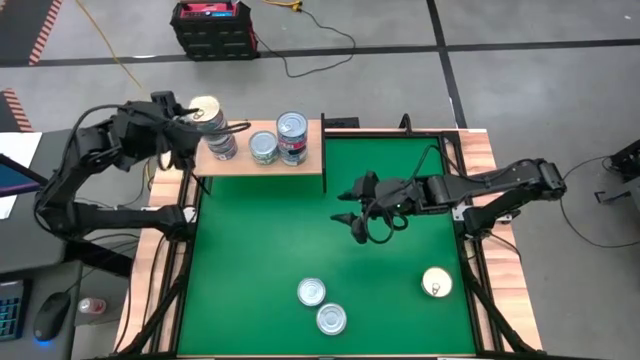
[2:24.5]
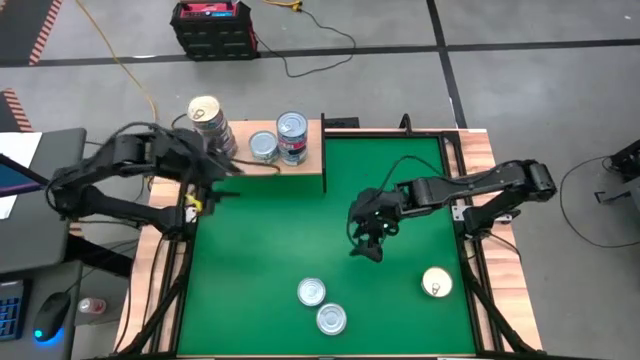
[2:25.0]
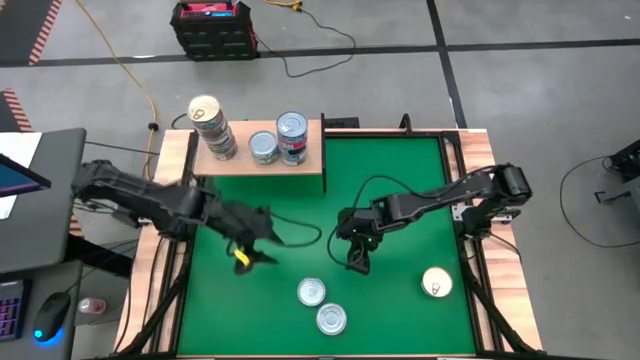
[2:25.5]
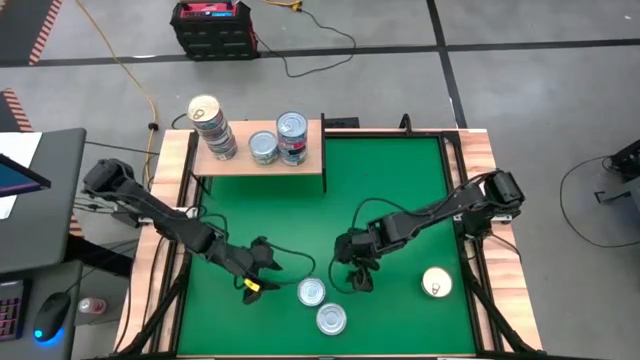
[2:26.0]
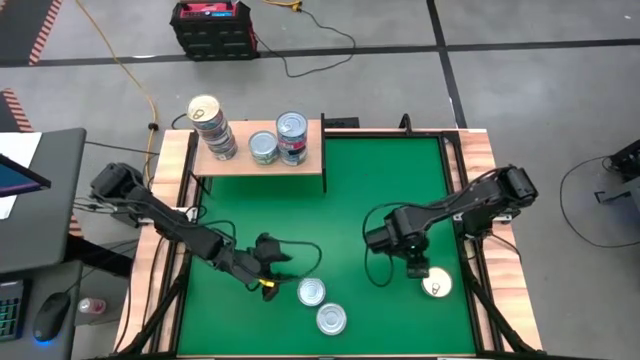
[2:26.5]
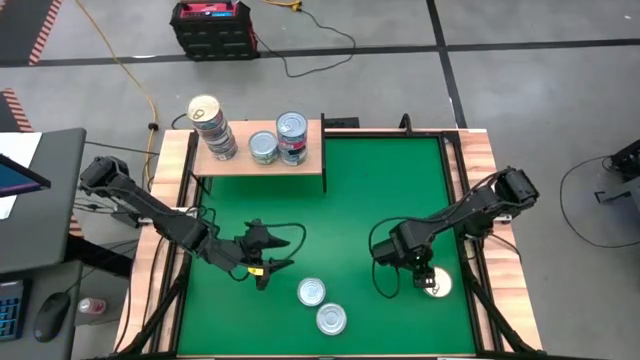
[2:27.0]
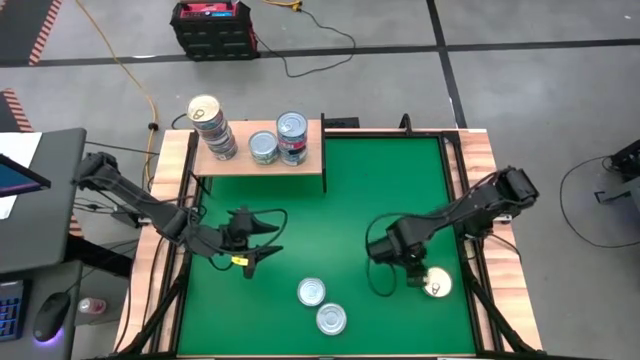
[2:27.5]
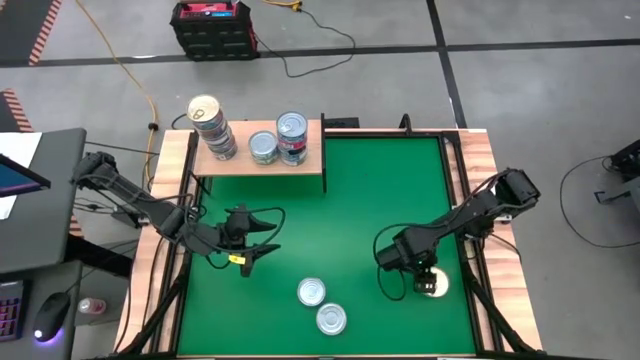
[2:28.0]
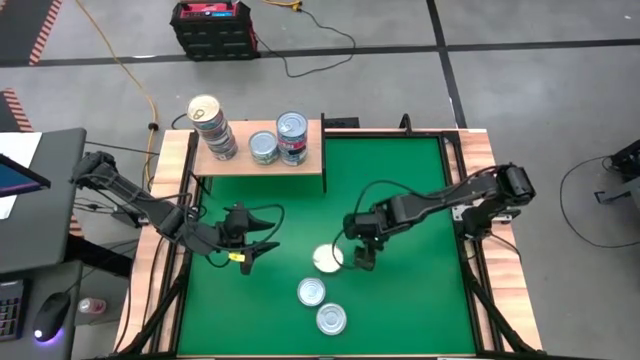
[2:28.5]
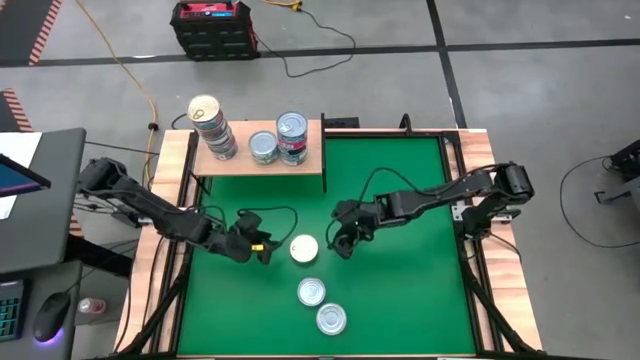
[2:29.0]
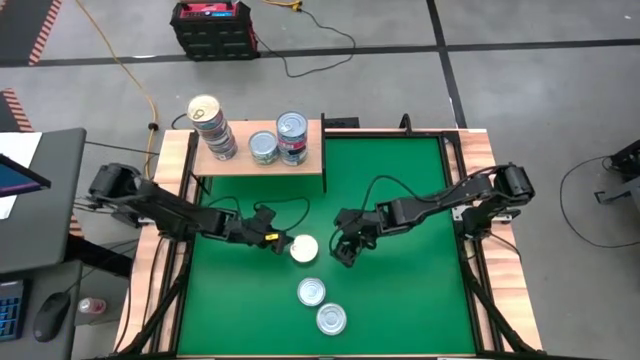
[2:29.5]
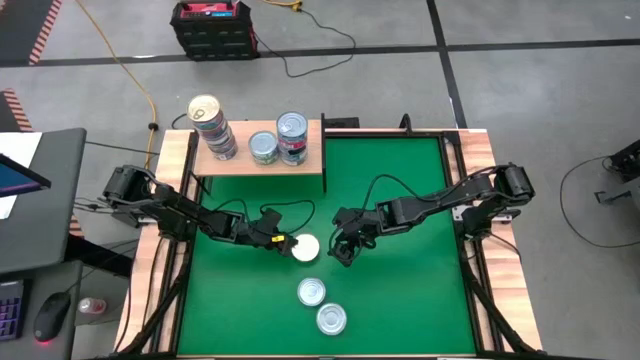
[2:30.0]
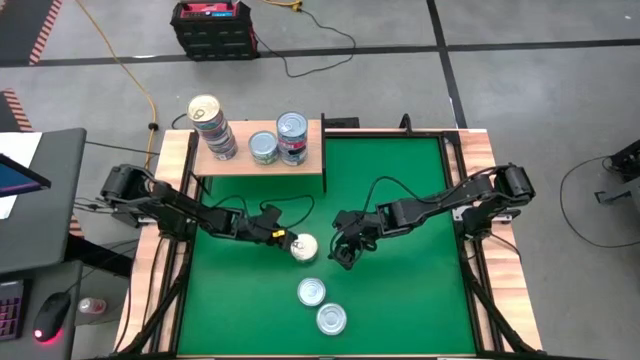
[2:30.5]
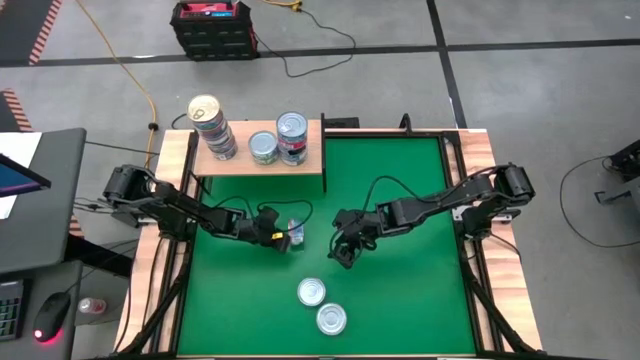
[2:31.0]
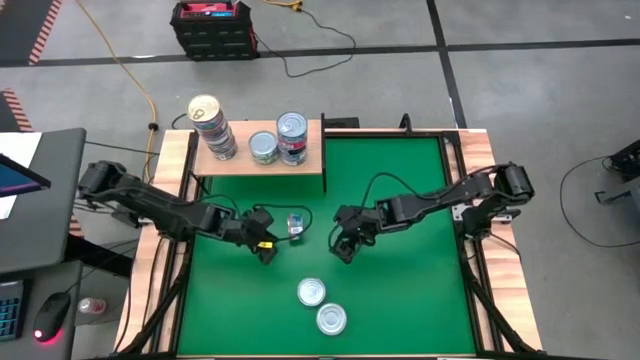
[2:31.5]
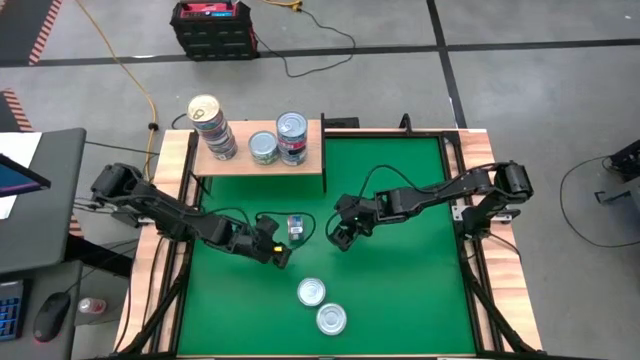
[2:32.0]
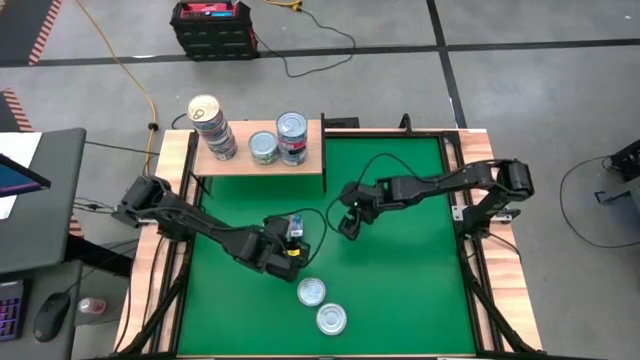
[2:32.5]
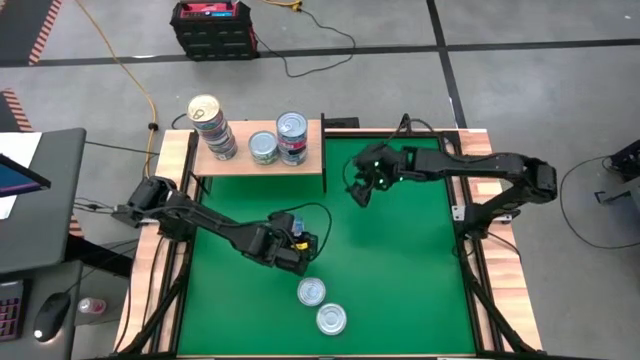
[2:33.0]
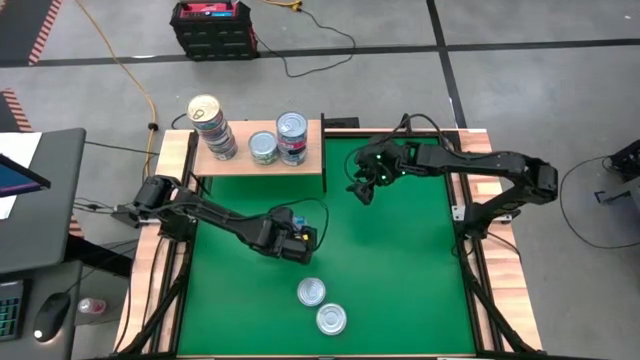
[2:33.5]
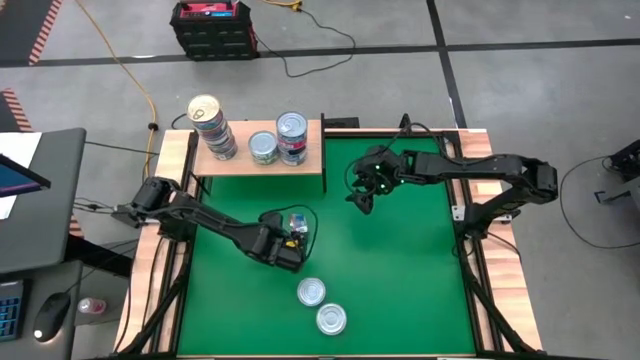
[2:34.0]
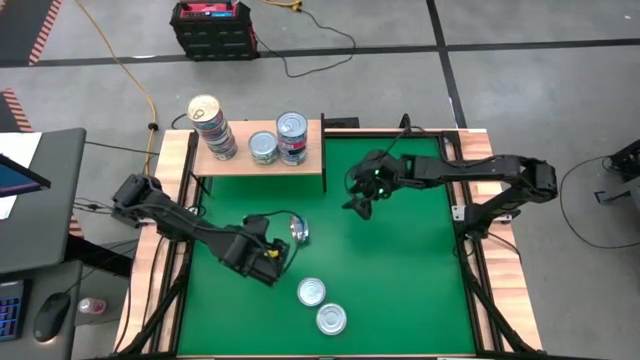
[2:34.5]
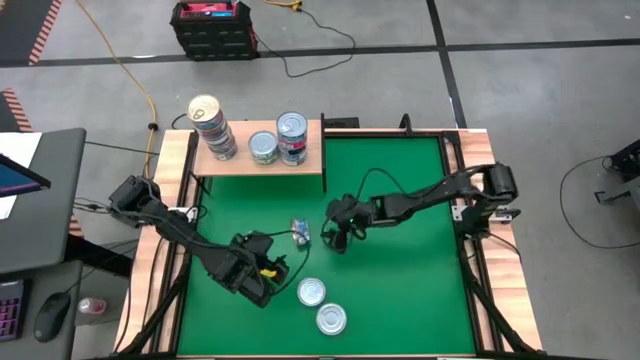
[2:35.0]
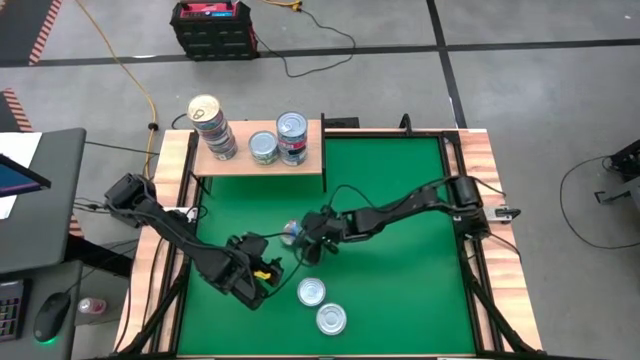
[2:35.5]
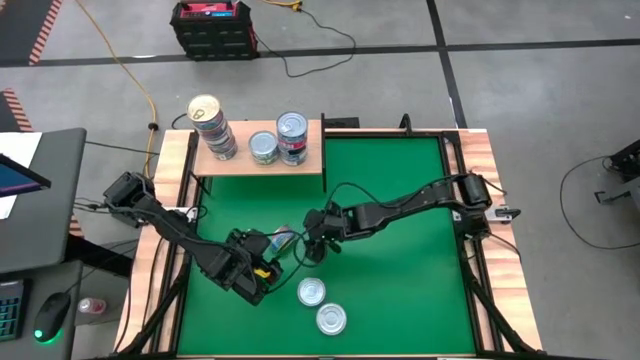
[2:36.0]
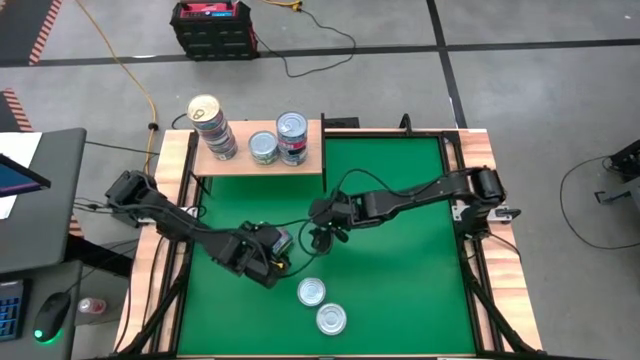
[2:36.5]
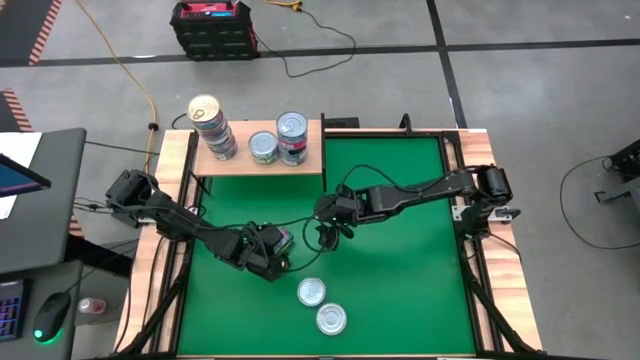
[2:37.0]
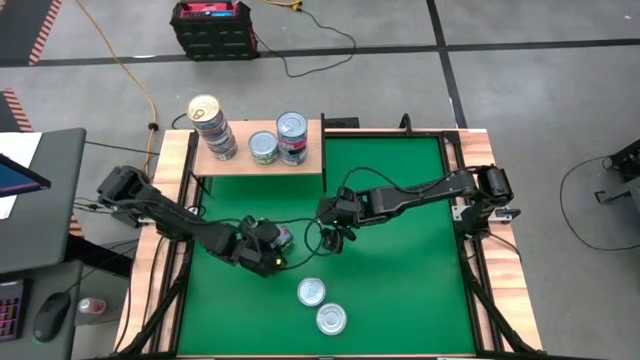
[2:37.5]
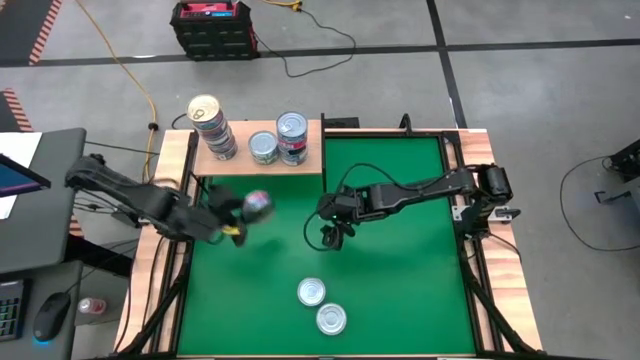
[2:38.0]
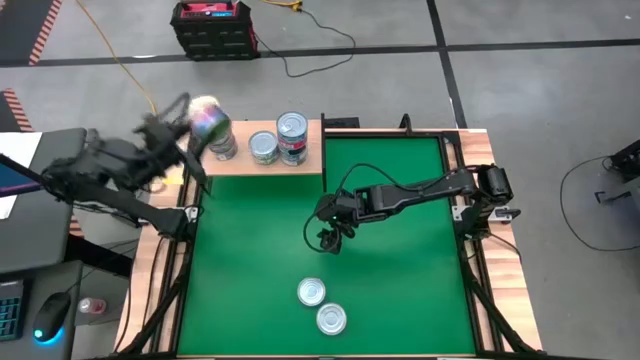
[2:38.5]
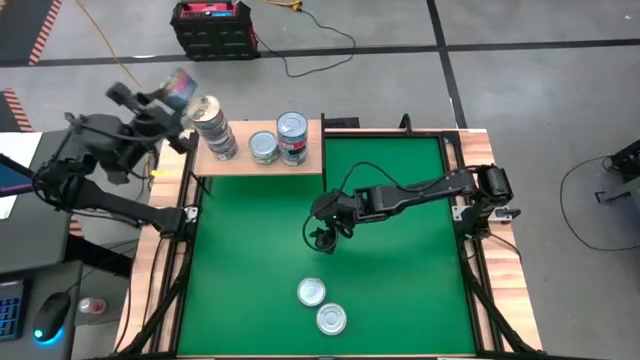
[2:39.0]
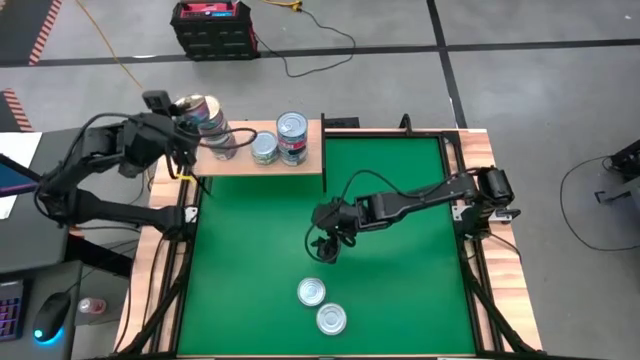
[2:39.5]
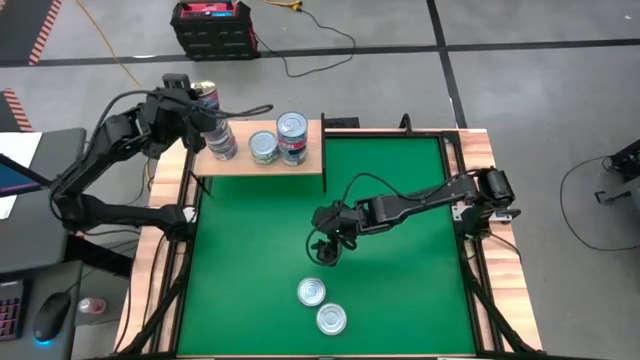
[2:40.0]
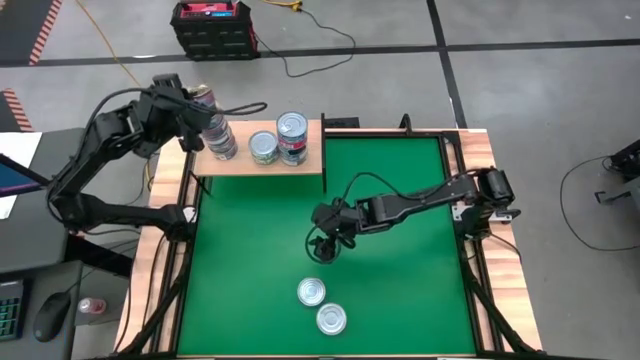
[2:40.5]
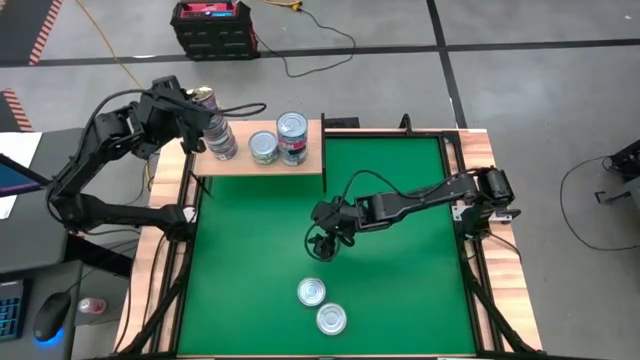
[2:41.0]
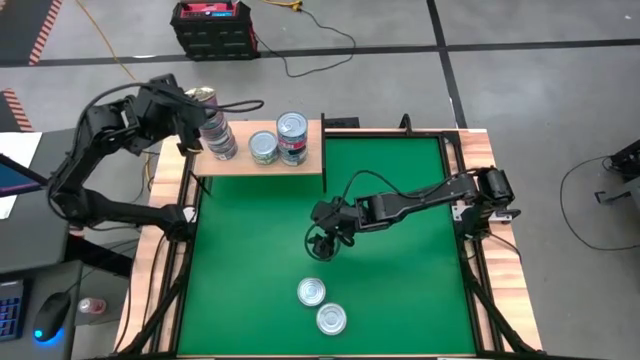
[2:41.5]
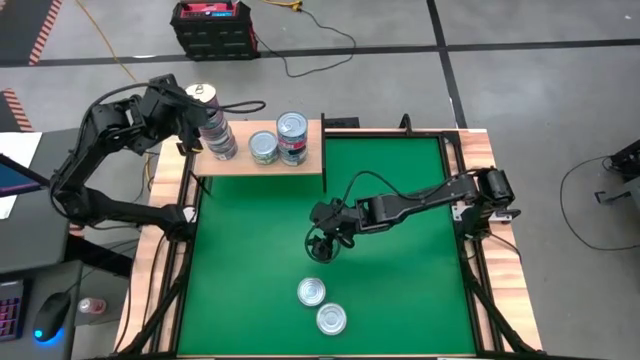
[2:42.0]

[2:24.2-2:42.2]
Task: Stack canned seafood by type on shelf
Stack the blue and pink tuna can on top of the blue and pink tuna cans on the shelf

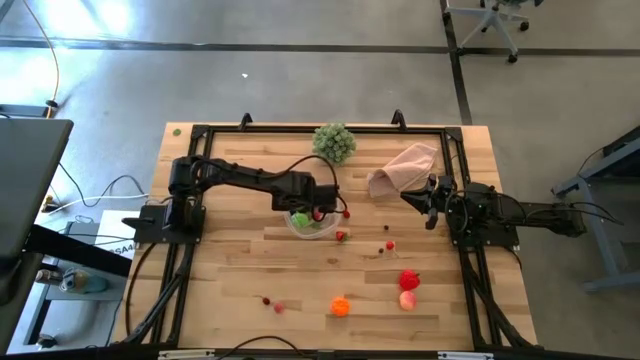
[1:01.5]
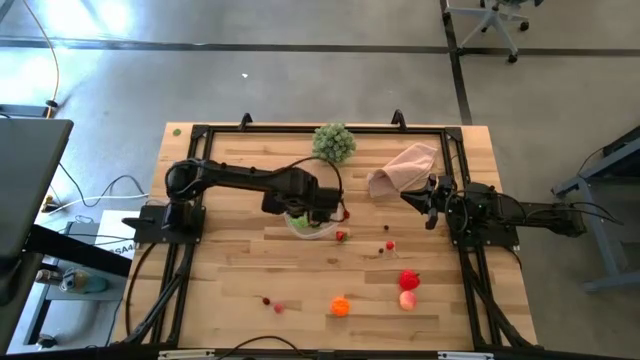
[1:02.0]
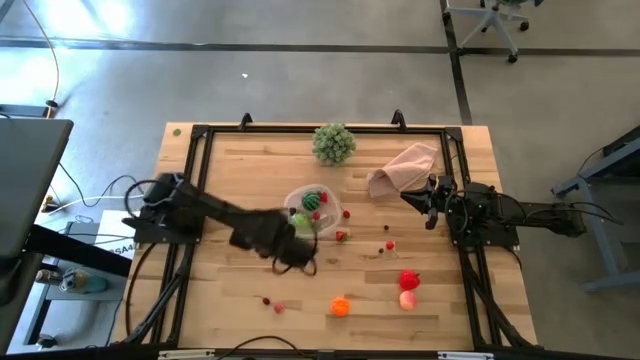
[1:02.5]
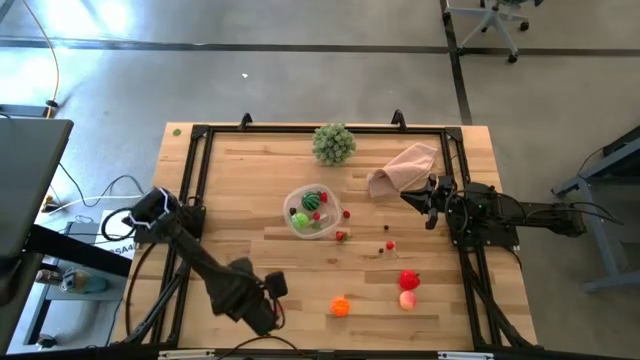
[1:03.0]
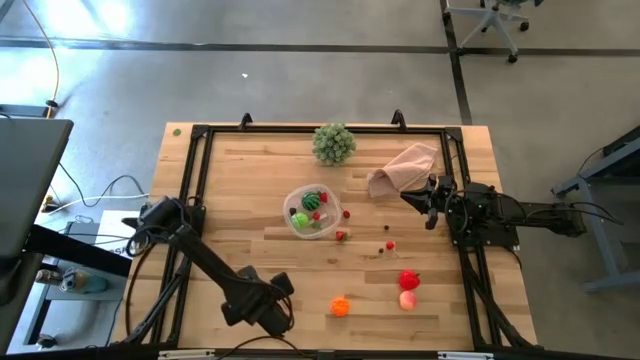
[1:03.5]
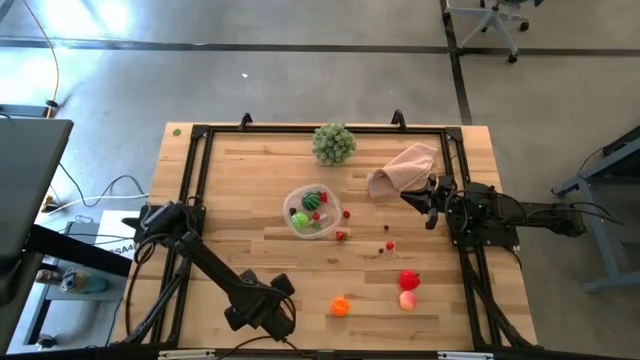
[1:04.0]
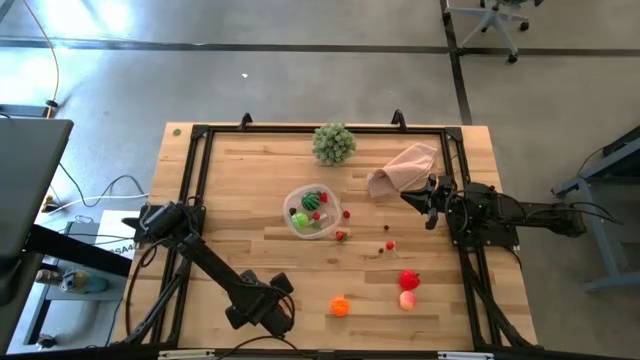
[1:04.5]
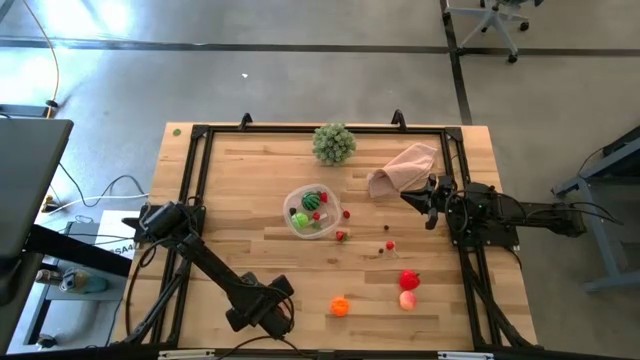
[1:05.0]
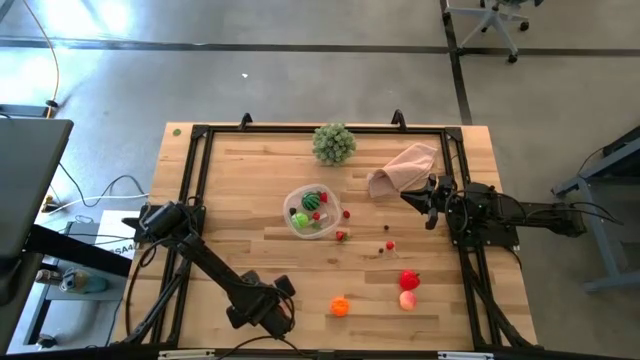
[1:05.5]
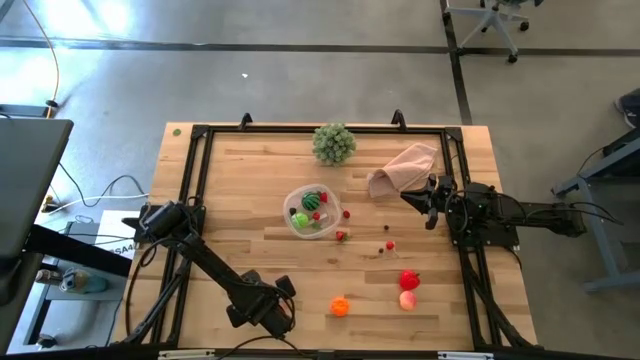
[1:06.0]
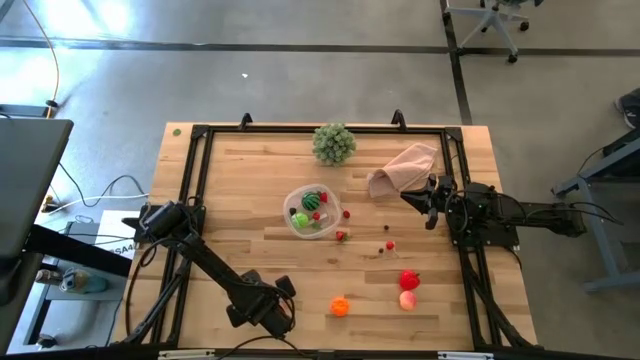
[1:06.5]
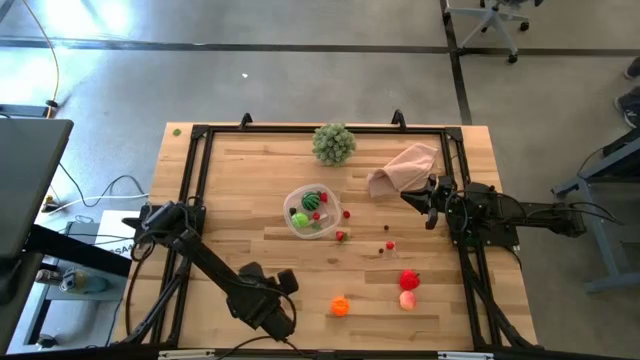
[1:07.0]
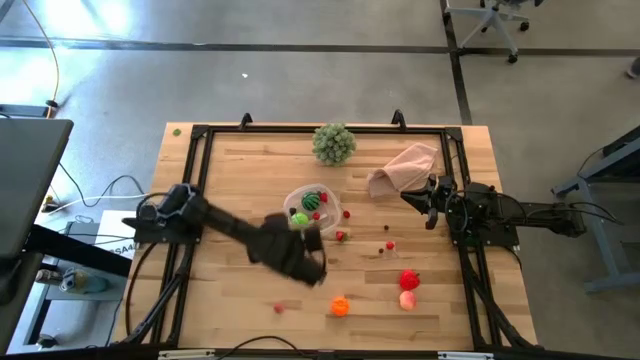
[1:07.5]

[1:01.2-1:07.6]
Task: Pick and placing Produce into tupperware
Put the red cherry into the transparent bin
